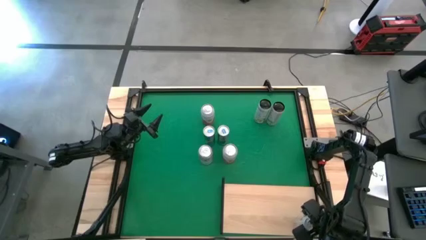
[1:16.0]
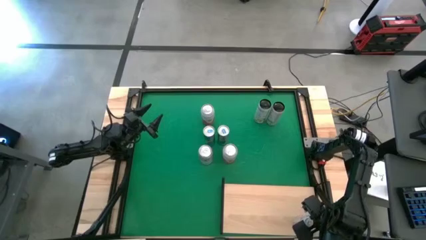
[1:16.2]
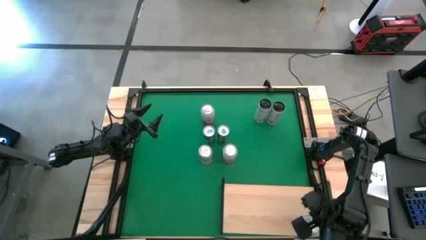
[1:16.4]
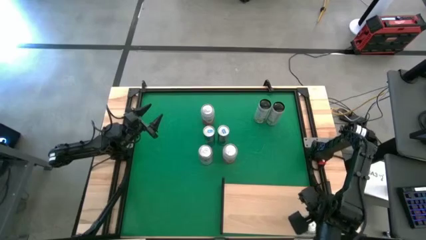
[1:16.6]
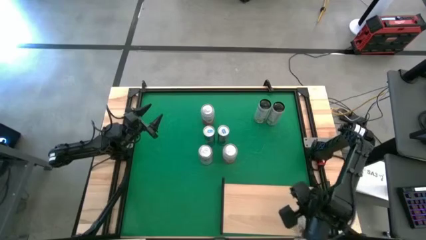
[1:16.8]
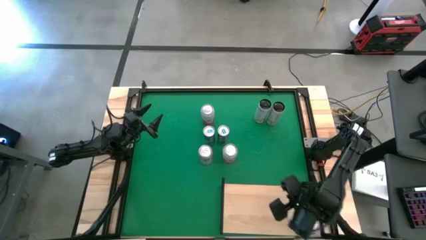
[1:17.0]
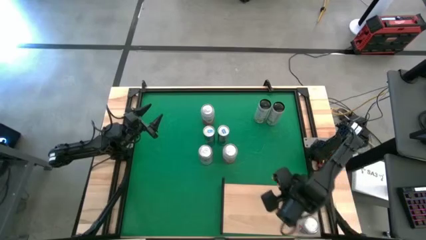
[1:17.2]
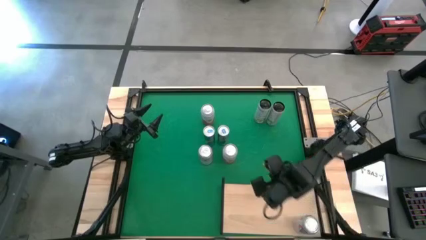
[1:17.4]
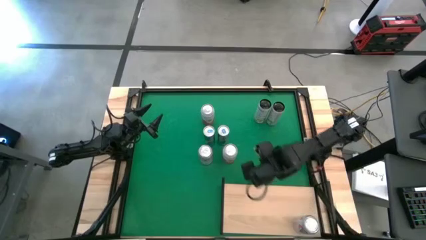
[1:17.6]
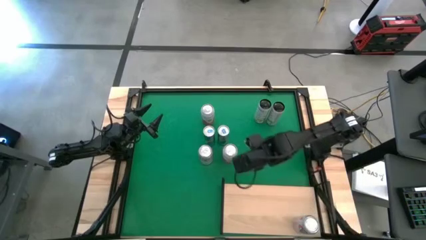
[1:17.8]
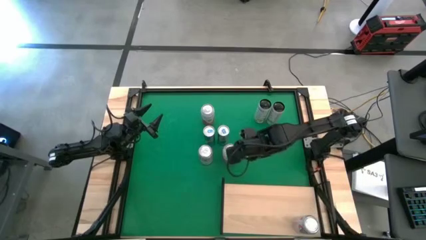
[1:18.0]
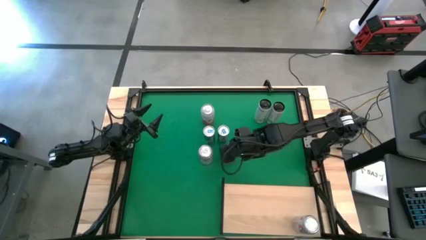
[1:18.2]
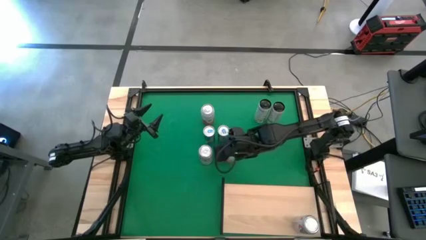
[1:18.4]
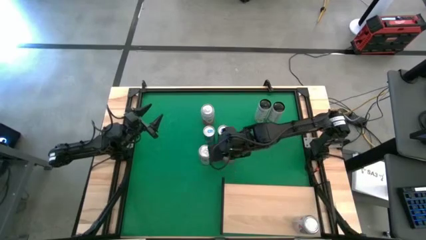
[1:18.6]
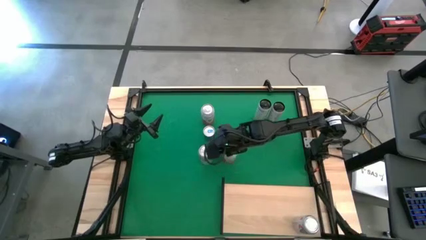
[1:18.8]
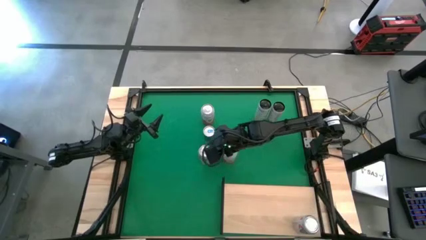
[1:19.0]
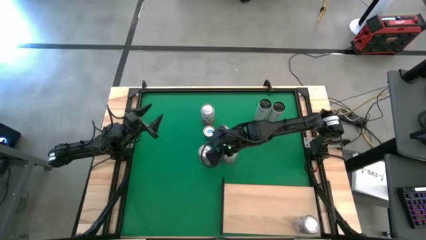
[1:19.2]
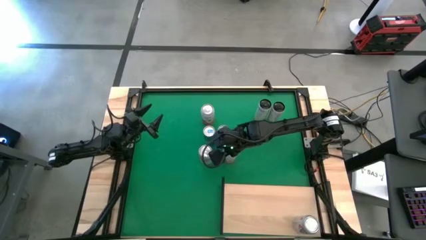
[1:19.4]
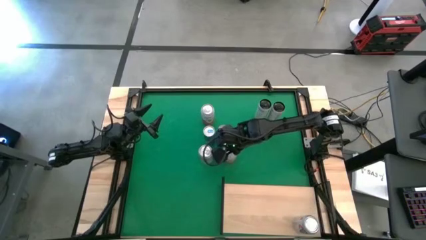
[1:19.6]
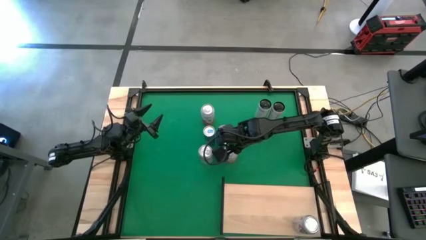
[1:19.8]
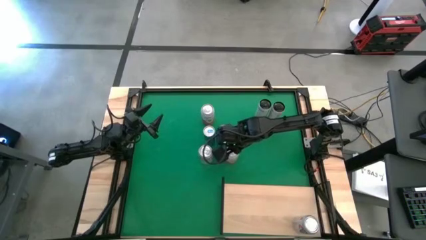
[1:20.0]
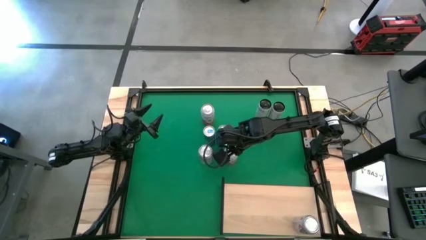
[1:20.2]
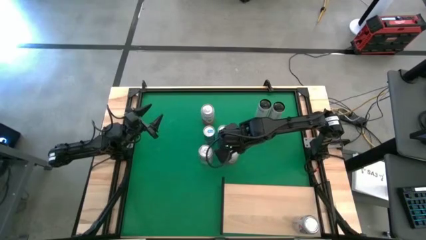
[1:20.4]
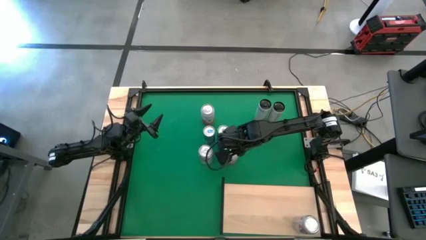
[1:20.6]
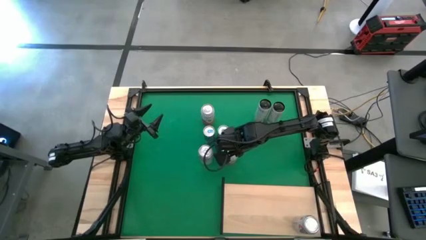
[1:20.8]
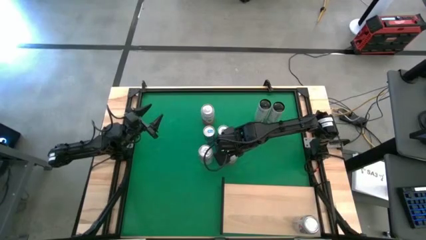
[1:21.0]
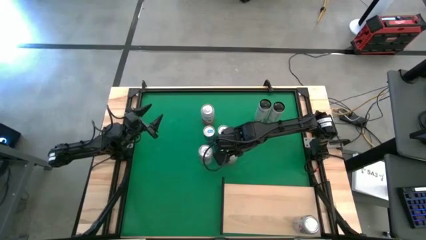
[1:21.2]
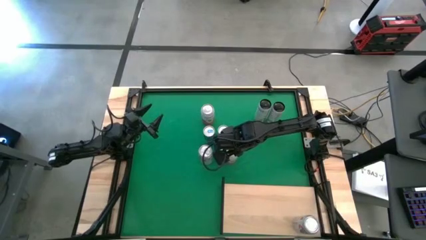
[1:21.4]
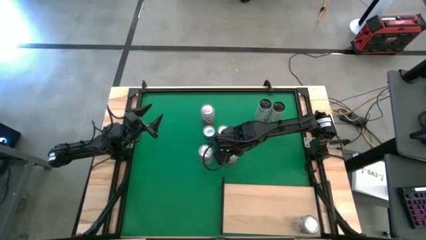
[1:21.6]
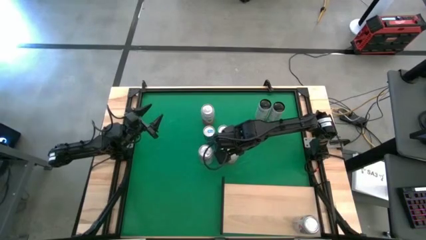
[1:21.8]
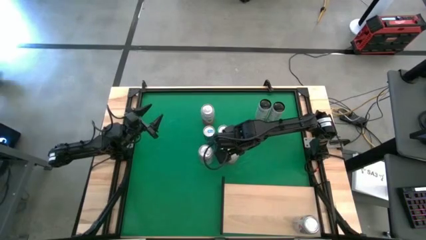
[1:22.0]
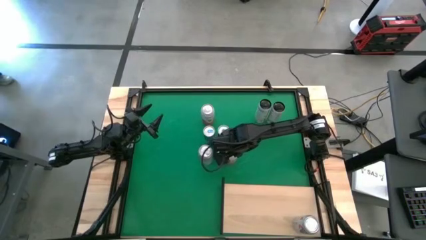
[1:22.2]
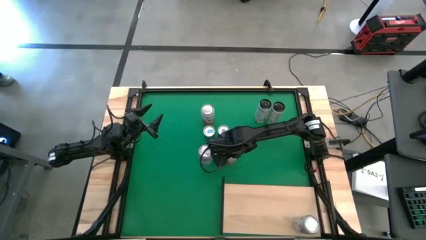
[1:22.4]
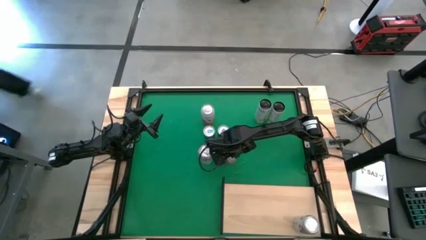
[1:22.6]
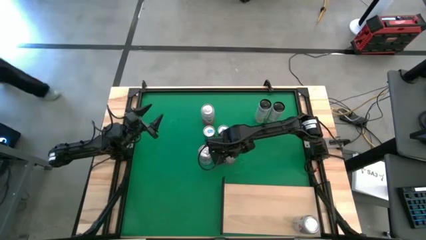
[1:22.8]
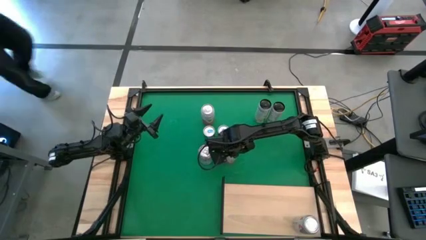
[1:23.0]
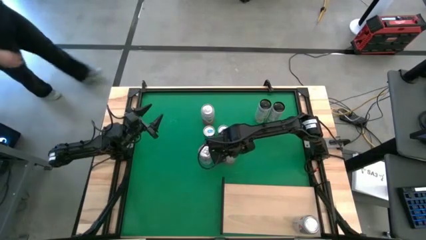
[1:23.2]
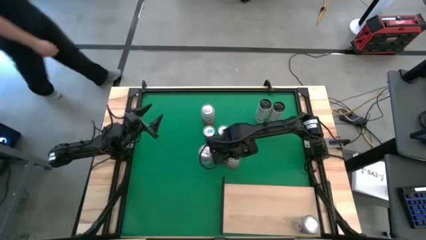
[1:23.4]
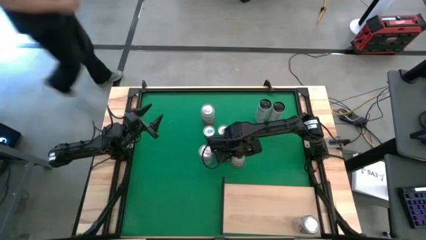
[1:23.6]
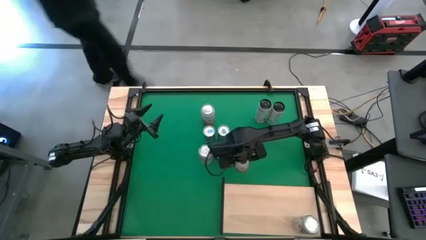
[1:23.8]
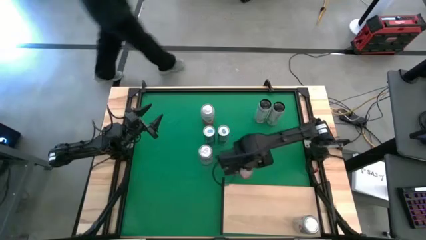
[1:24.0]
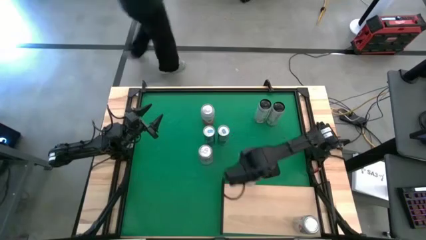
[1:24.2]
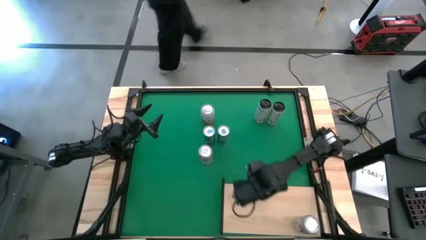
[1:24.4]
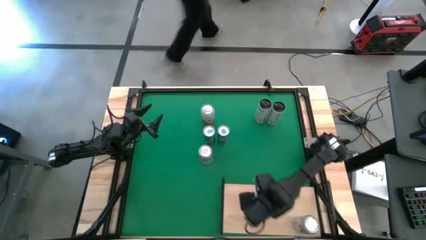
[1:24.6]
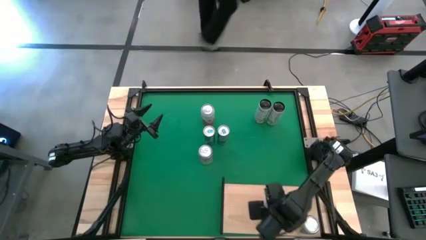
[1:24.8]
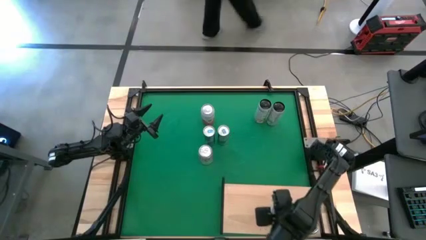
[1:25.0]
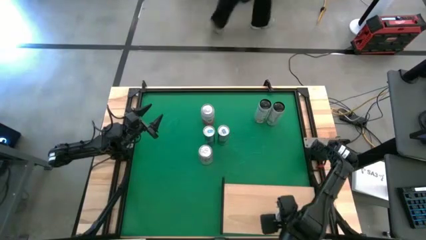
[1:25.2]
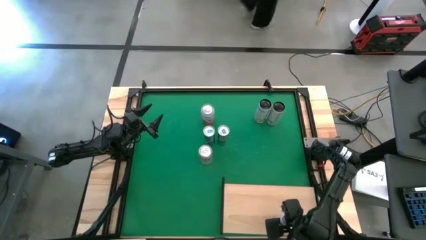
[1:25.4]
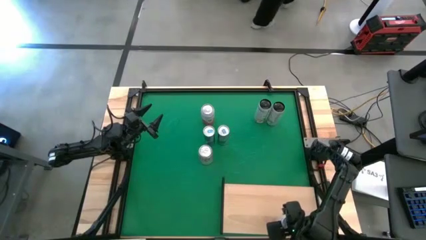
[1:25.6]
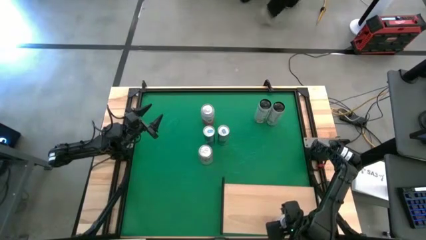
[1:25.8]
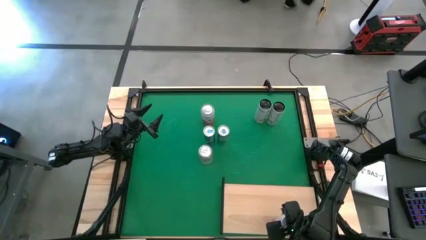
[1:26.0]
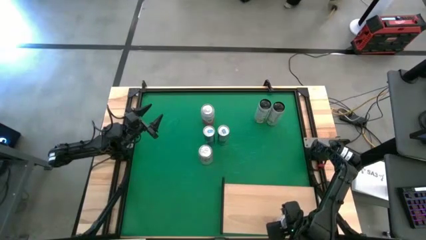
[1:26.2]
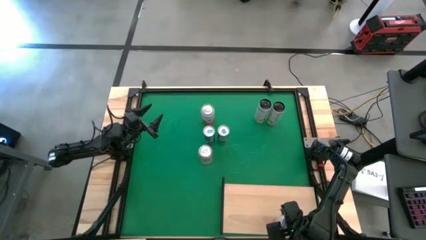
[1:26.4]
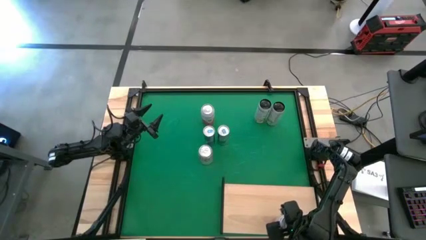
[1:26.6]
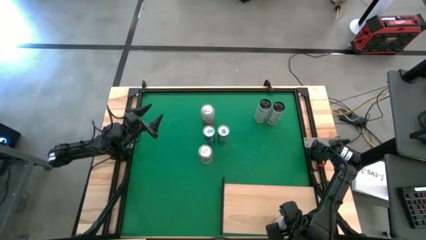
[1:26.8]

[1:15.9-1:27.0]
Task: Place canned beverage on shelf
Put the left pink-white soda can on the shelf

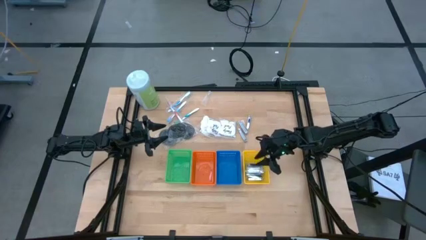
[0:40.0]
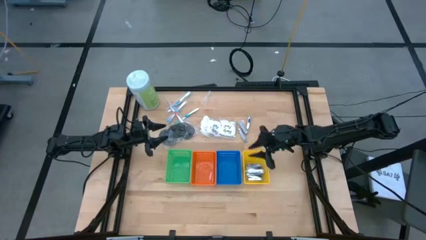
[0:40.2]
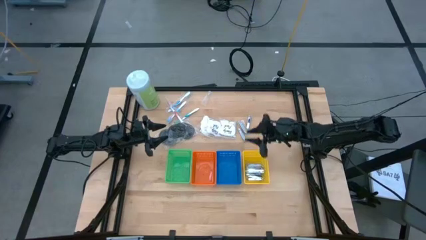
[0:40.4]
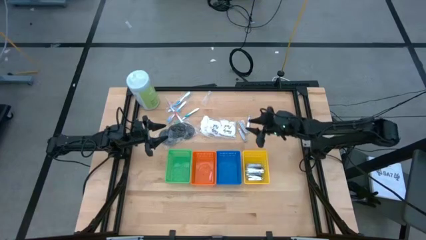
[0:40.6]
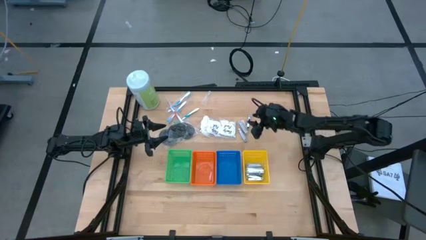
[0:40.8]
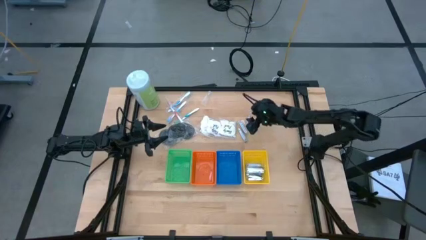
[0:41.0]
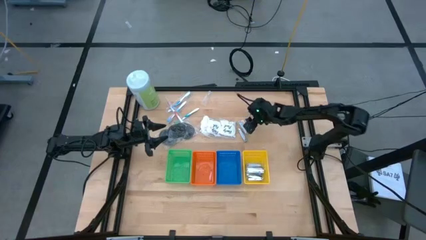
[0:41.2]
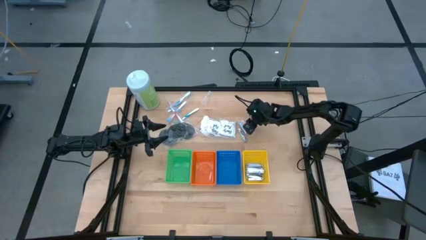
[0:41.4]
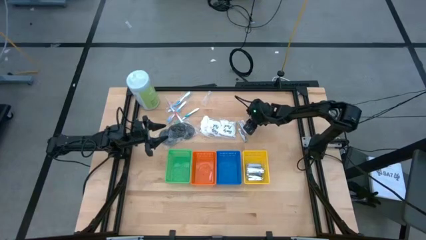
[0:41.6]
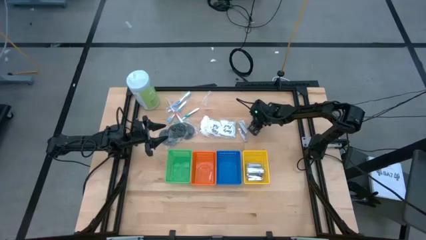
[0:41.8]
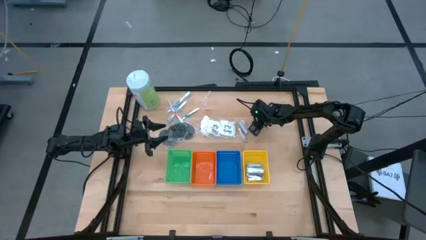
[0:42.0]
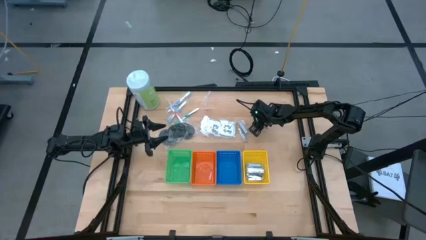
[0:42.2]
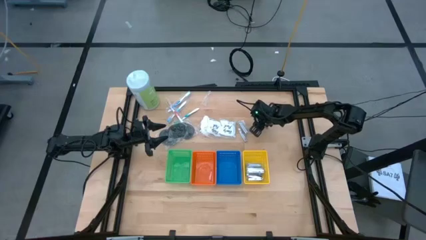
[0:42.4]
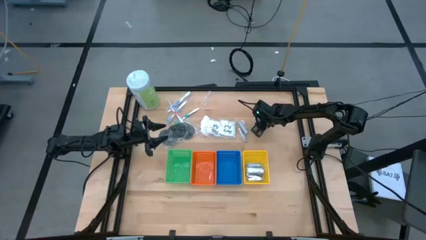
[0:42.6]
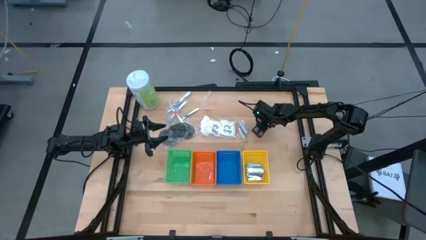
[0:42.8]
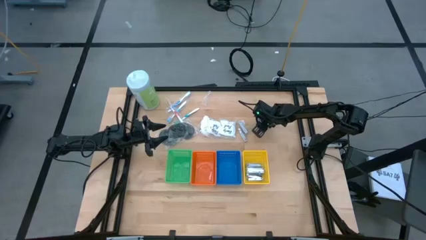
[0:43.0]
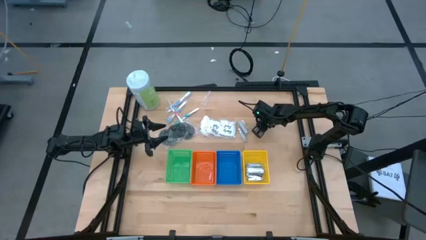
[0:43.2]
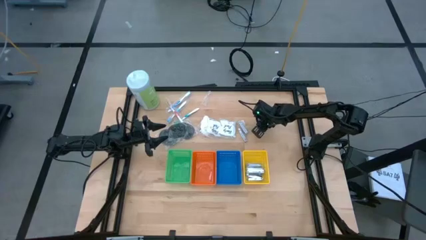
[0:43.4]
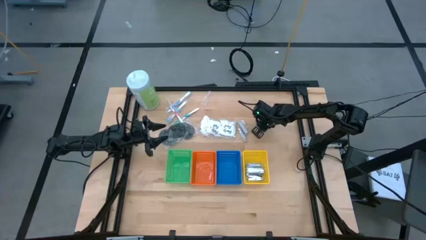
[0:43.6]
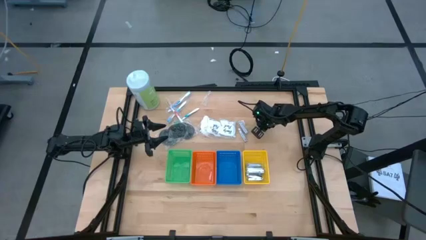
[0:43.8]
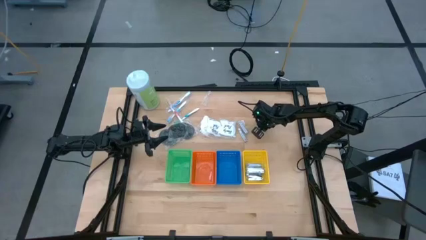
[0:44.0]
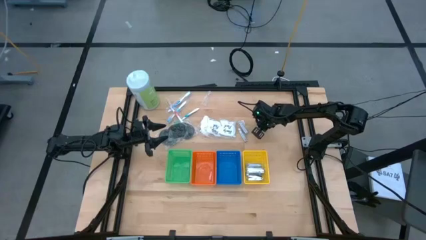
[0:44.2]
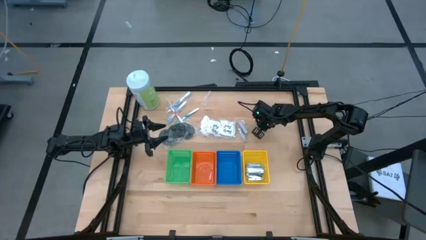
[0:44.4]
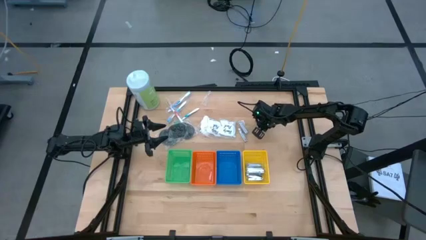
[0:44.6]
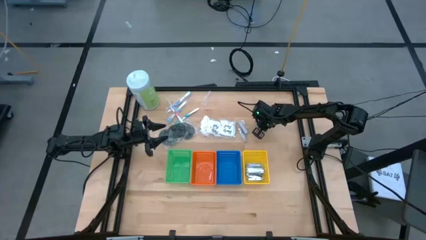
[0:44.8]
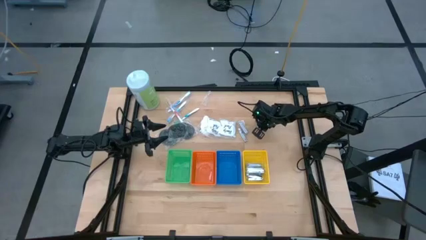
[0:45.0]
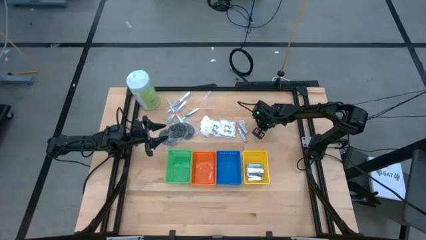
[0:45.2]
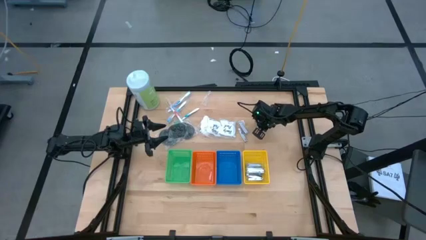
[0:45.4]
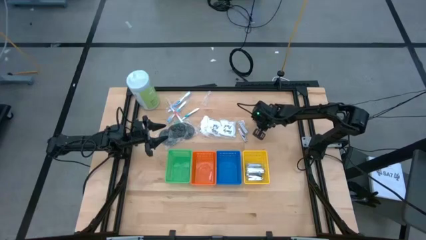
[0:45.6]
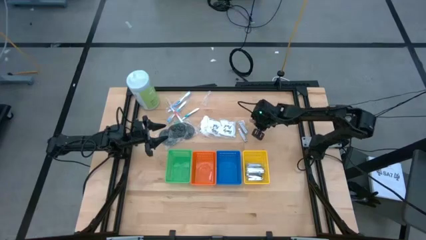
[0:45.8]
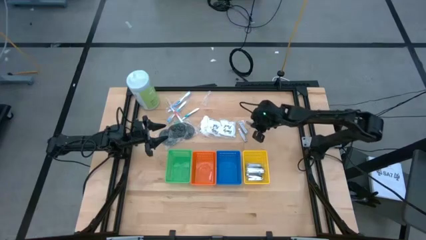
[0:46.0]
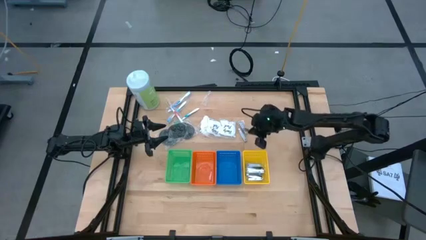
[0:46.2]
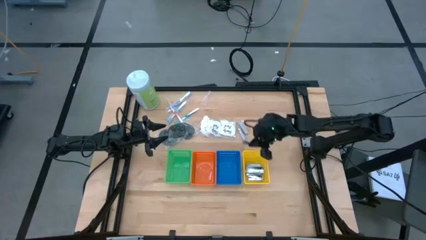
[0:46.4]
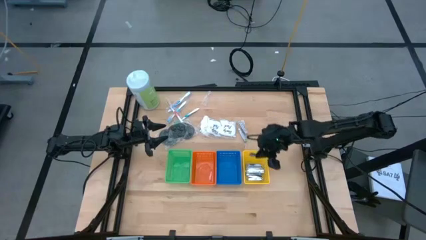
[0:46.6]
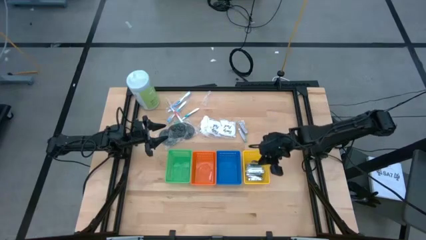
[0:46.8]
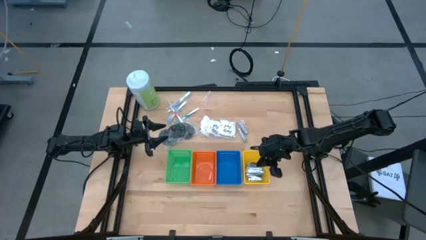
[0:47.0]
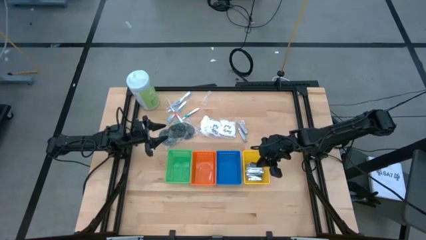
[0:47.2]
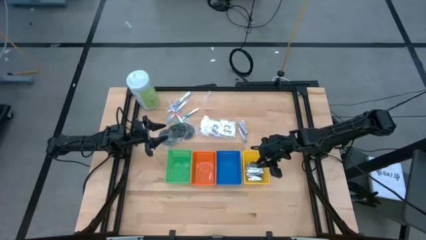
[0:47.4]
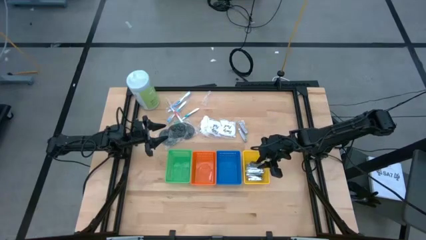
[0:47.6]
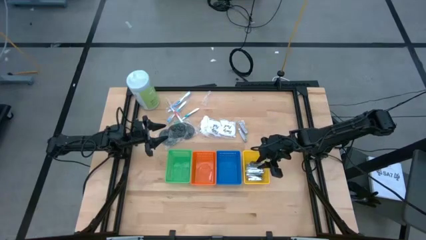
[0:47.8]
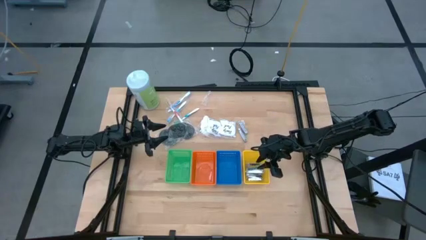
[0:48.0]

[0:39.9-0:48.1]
Task: Pick & Place Travel size toiletries
Put the silver nail cutter into the yellow basket
